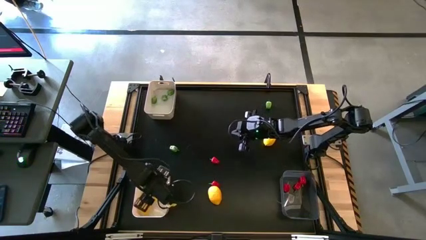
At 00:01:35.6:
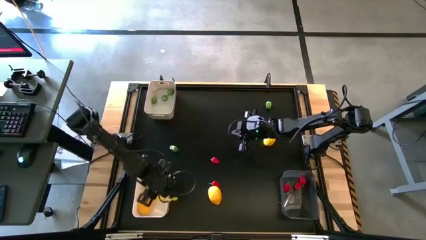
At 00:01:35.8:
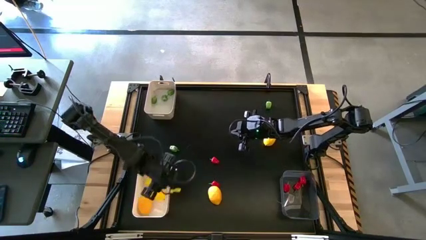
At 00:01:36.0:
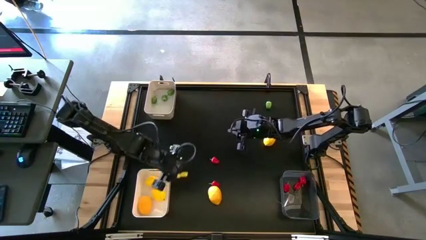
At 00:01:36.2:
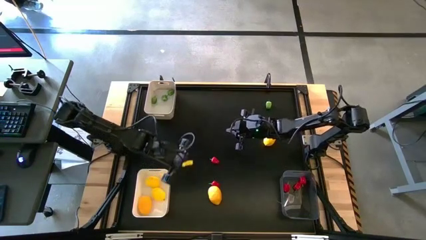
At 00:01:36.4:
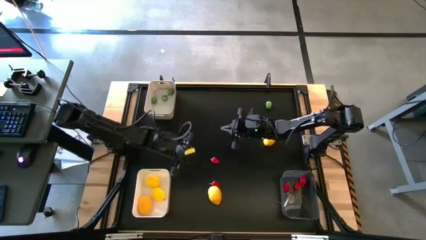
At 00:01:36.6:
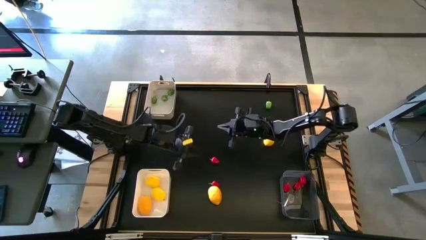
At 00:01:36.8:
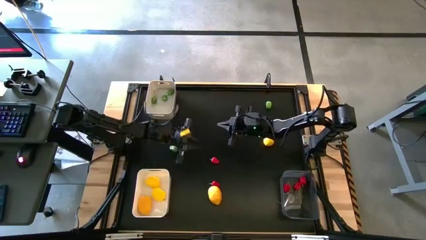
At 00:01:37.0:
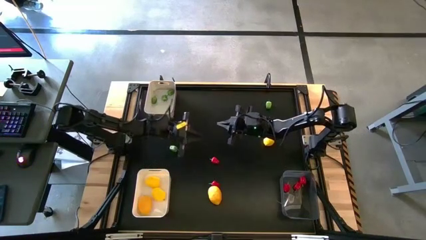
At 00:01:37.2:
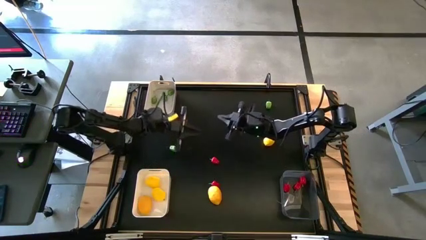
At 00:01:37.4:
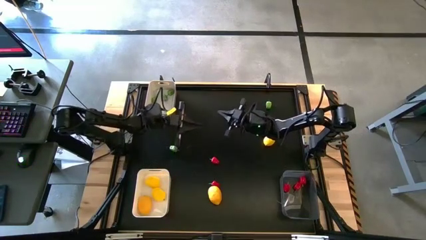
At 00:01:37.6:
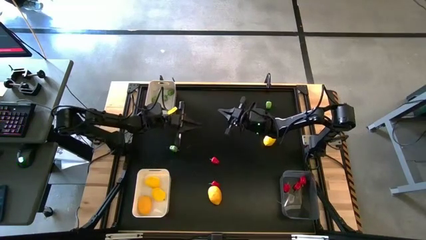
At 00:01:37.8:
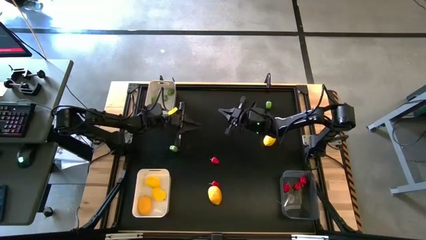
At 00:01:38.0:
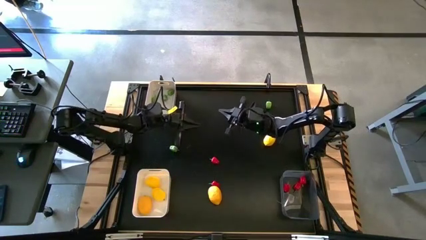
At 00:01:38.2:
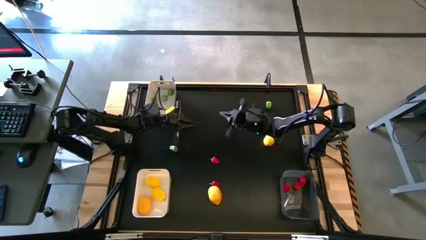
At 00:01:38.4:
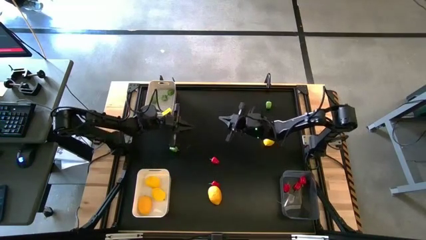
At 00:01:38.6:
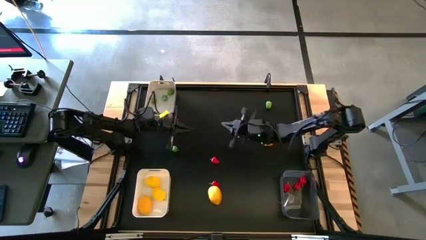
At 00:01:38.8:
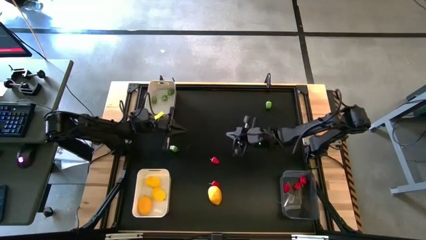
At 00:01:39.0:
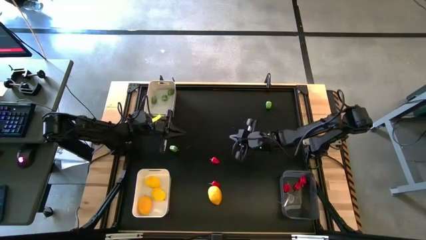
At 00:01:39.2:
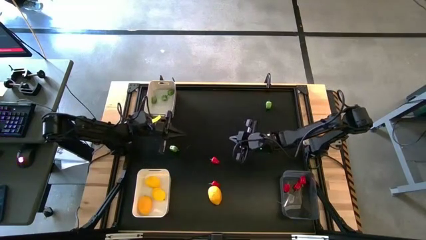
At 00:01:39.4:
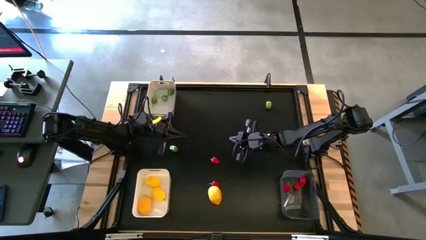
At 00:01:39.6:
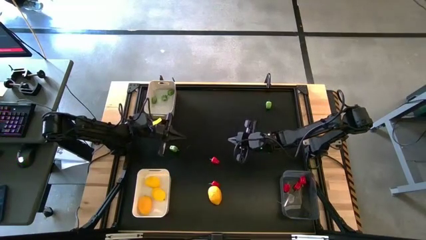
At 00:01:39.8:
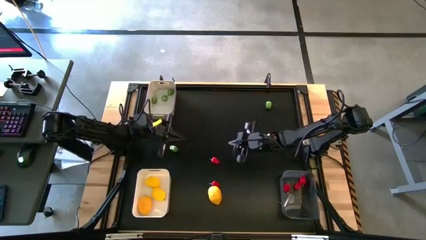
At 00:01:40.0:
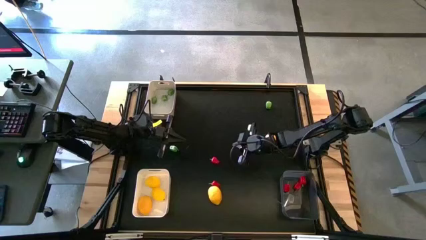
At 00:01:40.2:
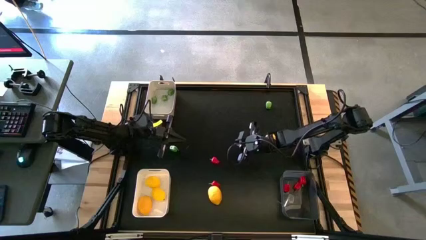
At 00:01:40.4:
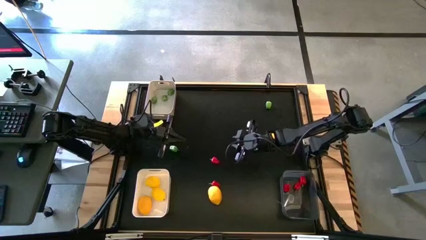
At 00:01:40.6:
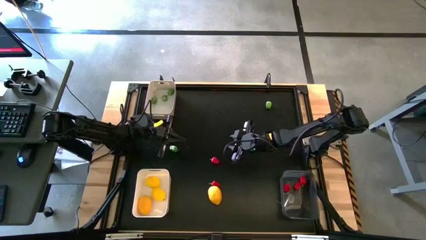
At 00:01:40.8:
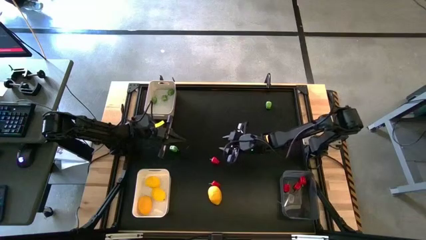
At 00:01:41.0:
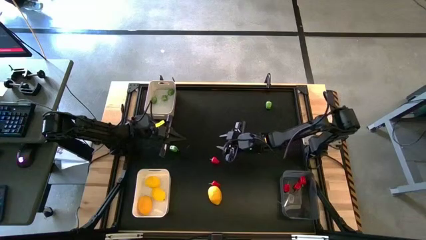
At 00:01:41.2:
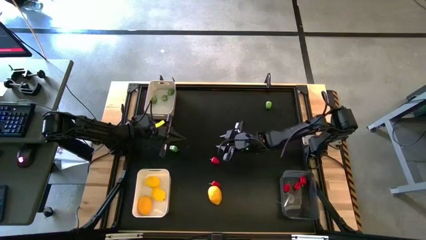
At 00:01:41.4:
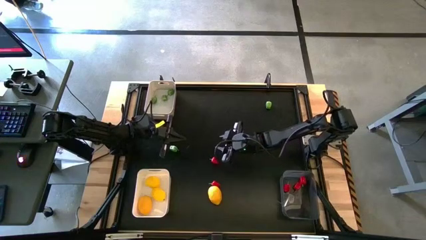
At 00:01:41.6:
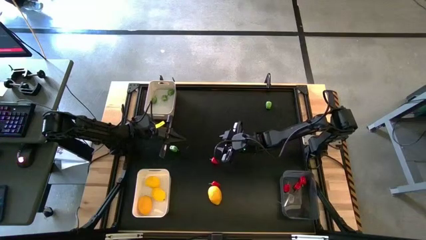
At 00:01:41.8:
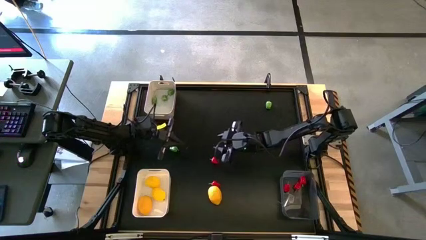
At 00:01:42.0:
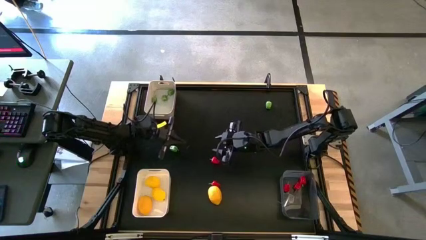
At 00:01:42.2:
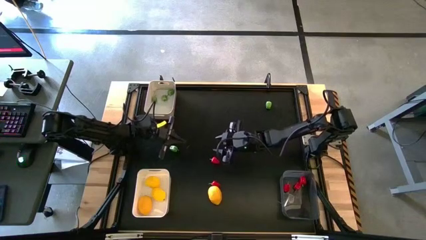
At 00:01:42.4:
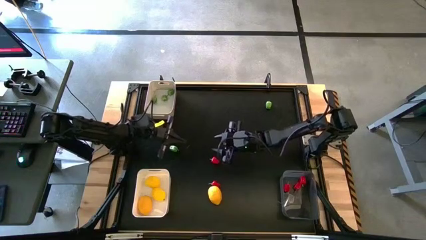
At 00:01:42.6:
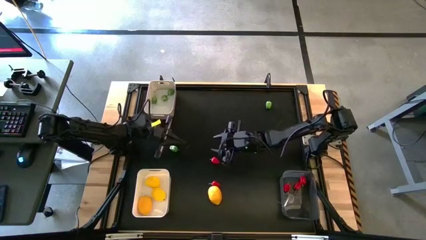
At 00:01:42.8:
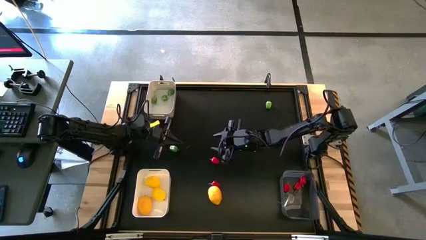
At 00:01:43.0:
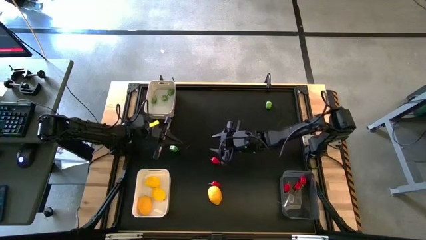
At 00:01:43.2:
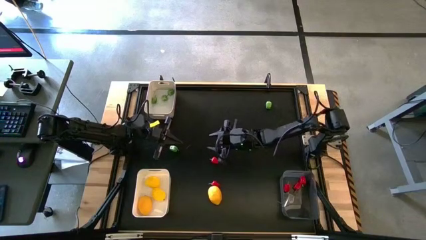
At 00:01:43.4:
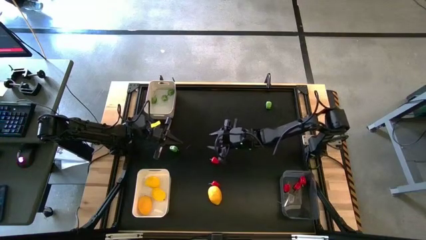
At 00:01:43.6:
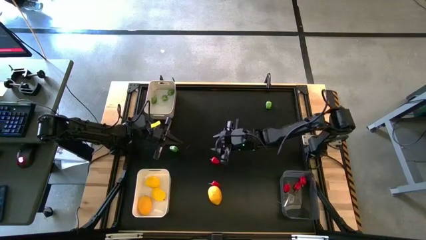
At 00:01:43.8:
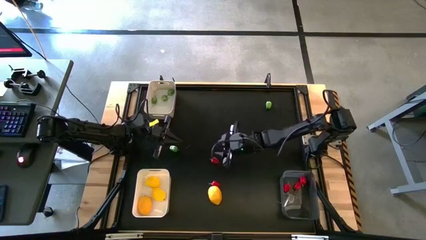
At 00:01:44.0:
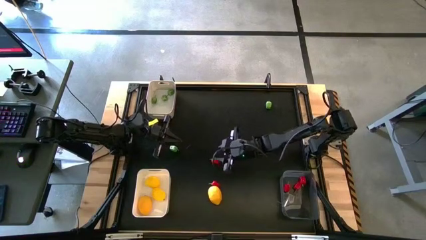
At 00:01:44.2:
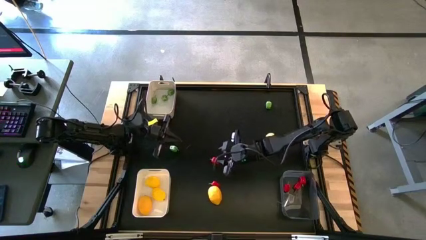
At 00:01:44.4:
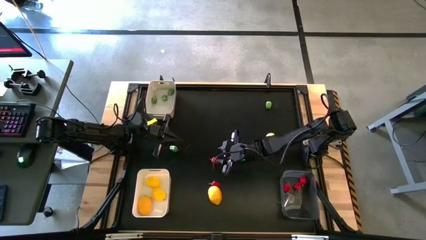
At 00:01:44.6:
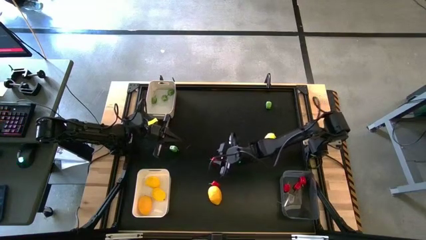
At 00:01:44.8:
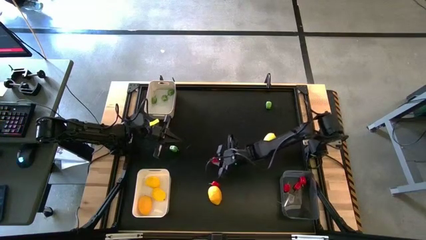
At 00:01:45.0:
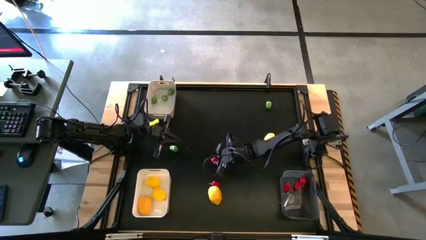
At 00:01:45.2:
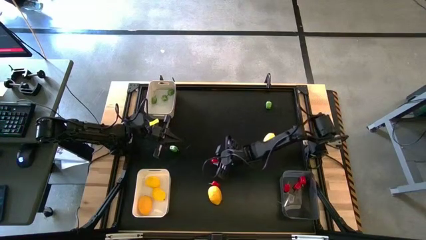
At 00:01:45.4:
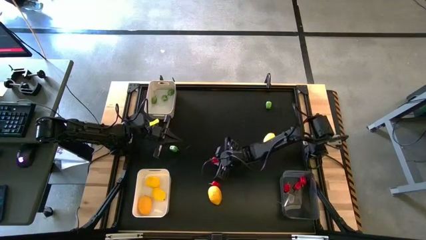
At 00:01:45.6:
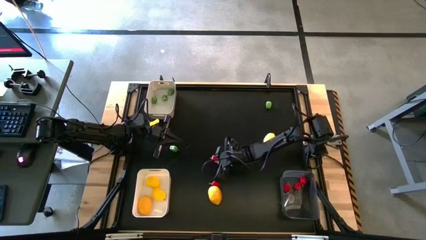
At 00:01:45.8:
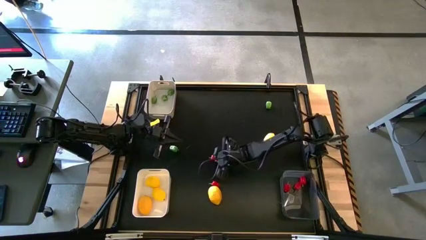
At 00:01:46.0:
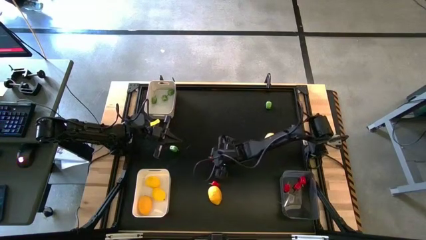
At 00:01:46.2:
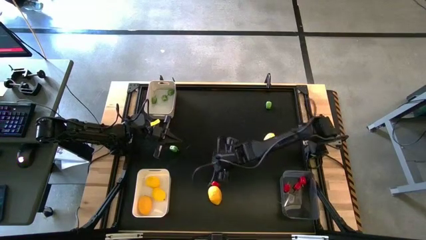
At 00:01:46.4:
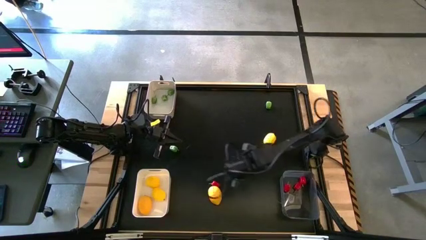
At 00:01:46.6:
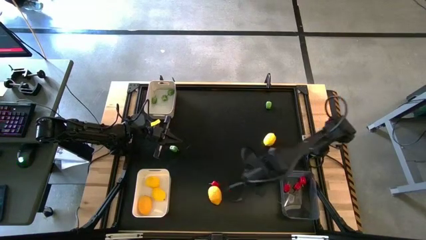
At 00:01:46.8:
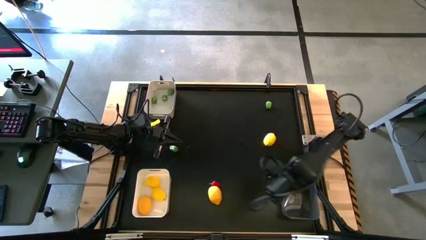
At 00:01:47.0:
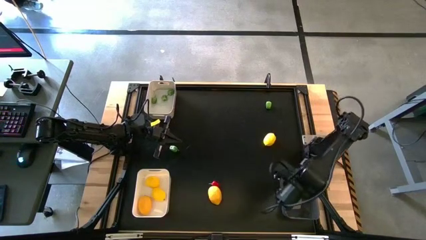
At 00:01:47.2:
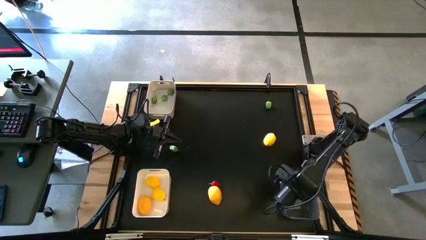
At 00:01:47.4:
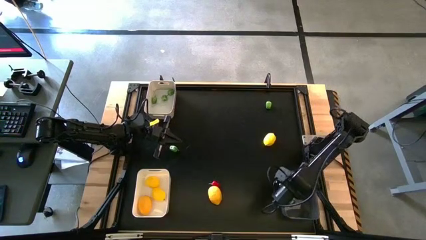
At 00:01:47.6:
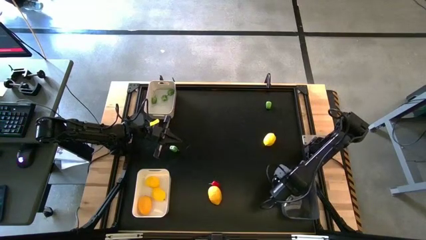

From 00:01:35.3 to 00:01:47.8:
Task: Sort produce into baskets
Put the red chili pepper into the black transparent bin

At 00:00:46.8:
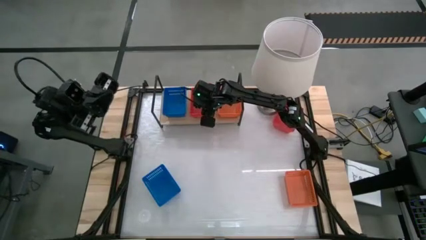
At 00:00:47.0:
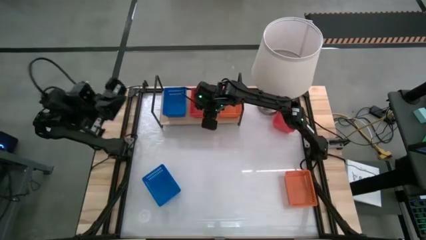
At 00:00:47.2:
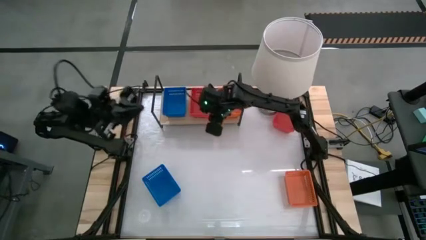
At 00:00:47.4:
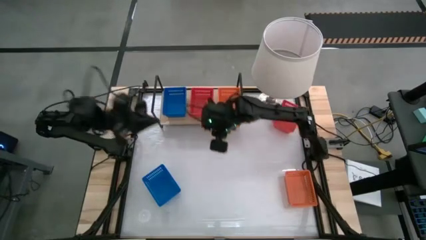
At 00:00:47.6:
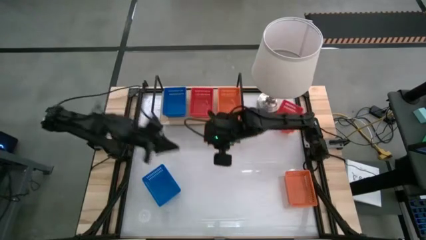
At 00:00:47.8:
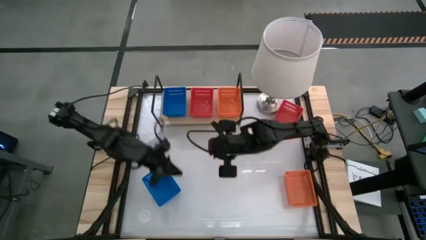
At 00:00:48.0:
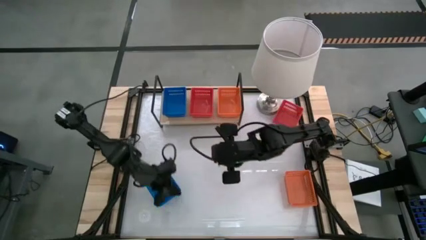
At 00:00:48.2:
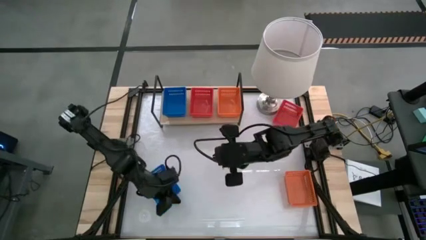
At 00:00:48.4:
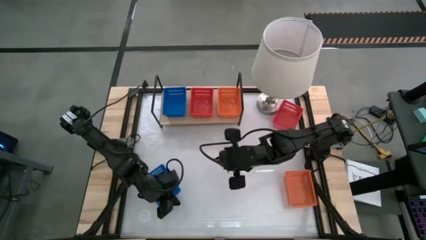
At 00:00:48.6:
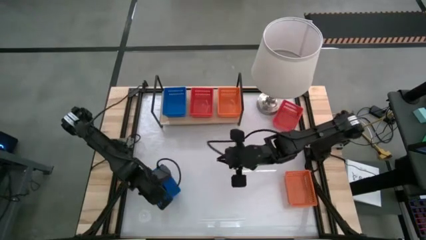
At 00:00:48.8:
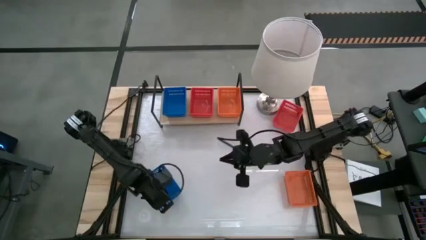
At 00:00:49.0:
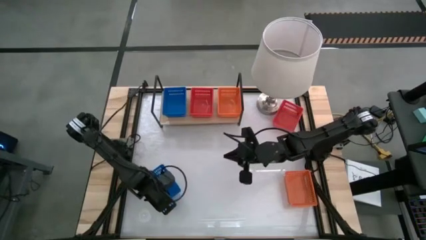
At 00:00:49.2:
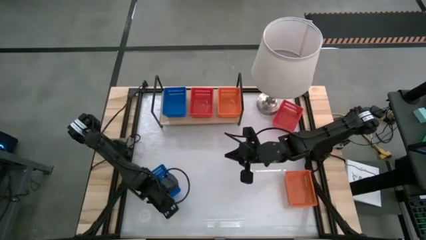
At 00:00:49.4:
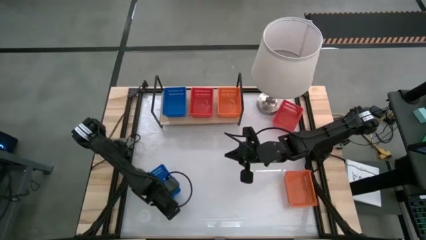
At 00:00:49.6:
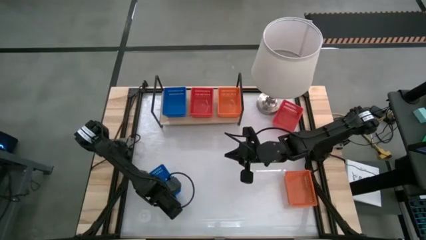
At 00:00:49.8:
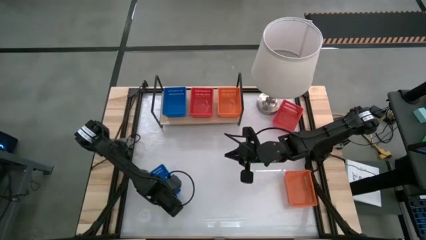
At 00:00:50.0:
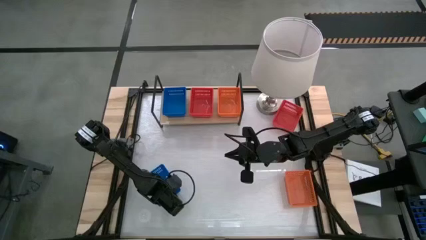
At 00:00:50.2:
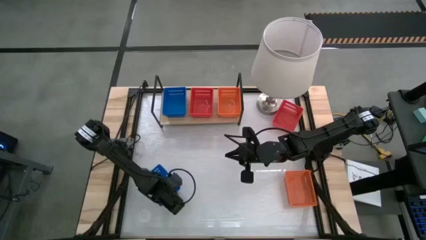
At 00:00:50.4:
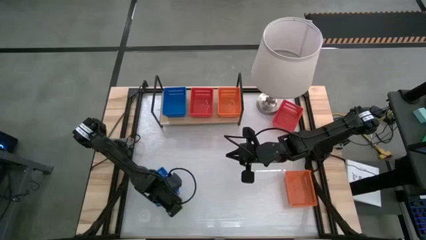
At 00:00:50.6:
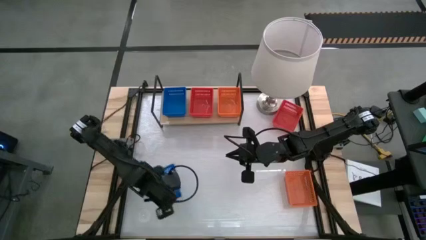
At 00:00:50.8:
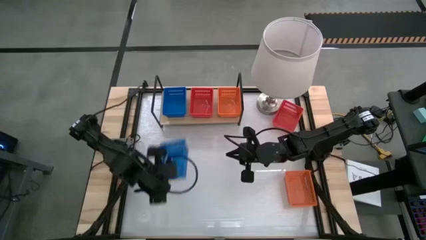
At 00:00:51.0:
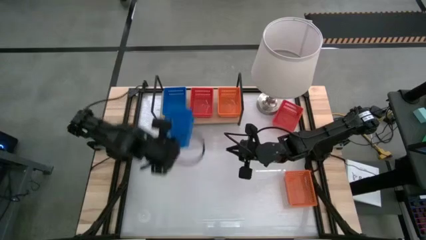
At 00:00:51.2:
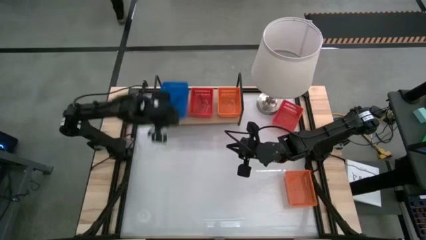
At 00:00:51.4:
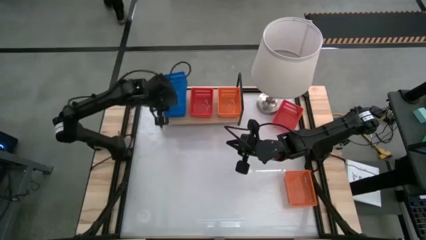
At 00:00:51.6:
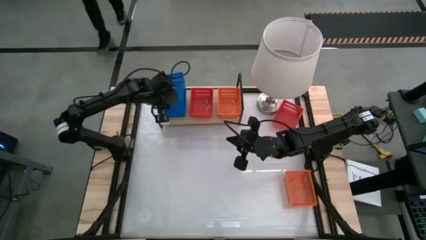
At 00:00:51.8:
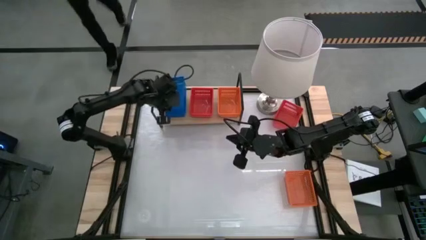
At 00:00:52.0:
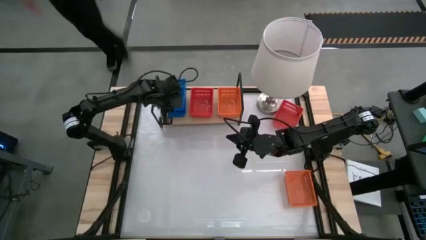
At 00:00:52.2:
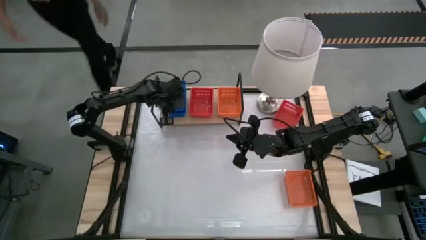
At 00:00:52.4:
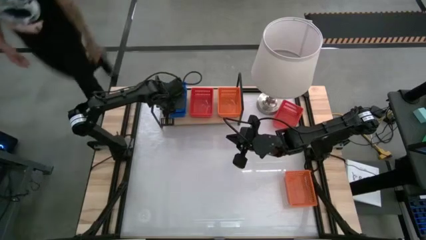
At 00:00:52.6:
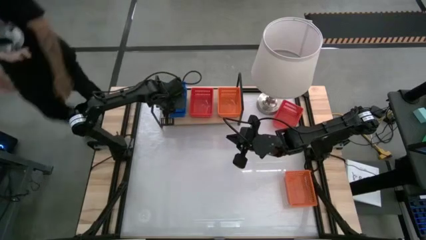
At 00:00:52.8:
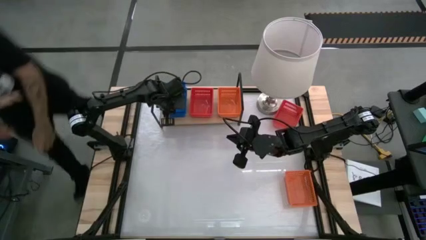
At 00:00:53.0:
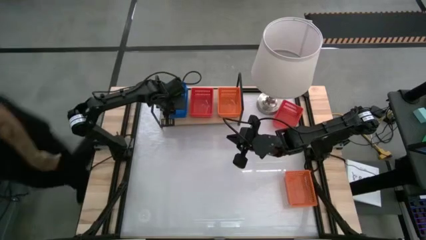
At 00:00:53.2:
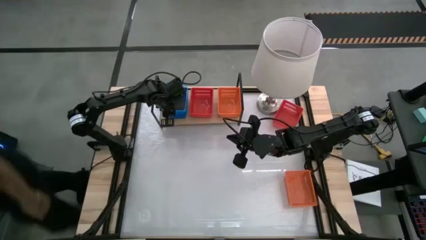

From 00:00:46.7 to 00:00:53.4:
Task: Stack baskets on shelf by color
Stack the blue basket on top of the stack blue baskets on the shelf
